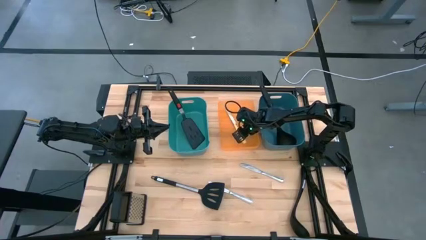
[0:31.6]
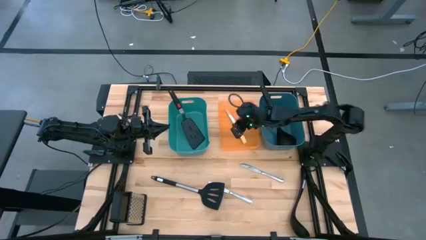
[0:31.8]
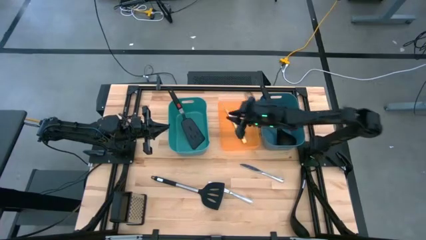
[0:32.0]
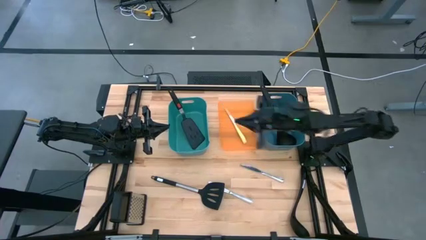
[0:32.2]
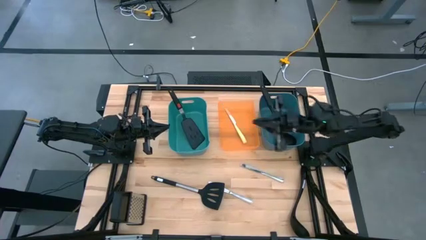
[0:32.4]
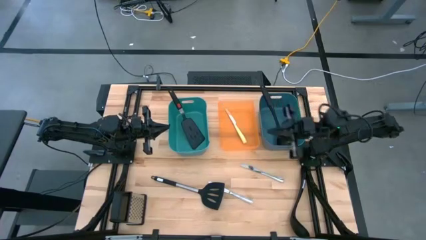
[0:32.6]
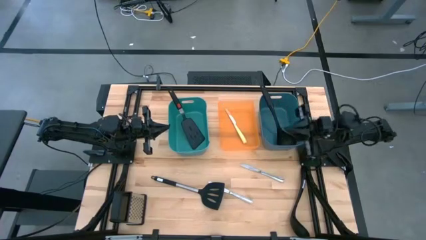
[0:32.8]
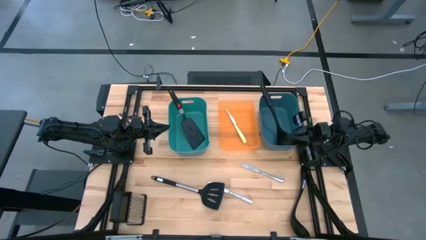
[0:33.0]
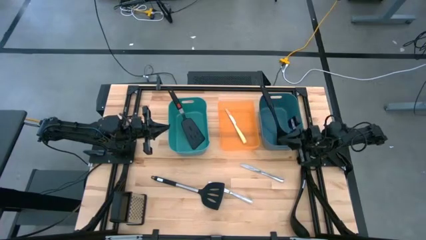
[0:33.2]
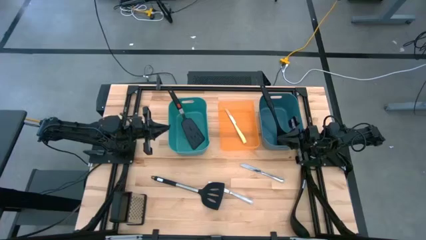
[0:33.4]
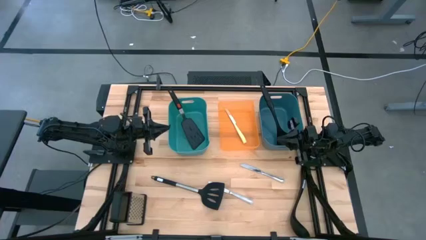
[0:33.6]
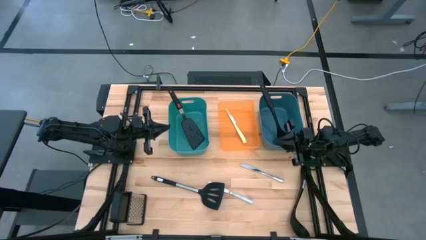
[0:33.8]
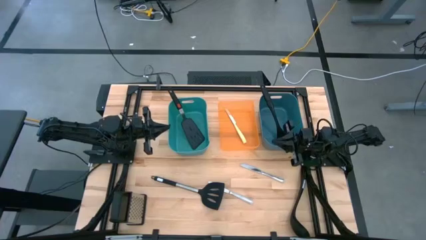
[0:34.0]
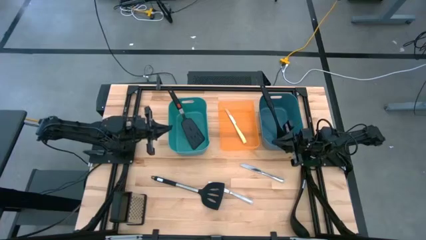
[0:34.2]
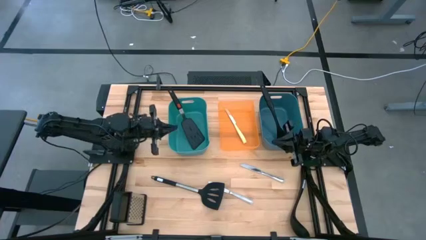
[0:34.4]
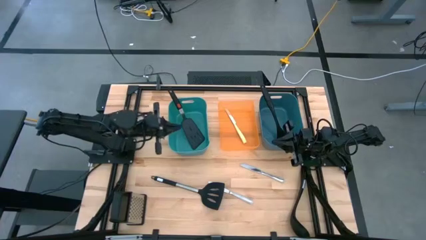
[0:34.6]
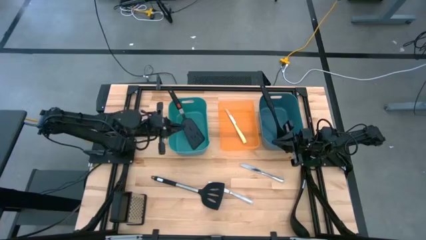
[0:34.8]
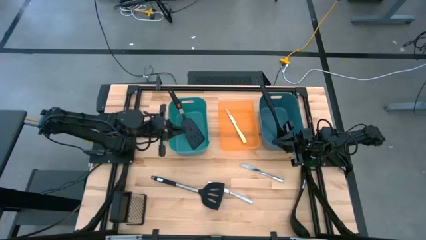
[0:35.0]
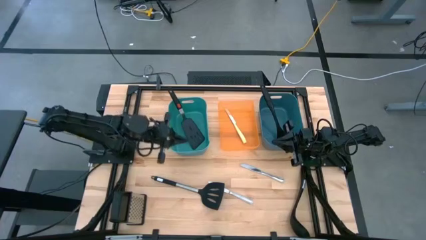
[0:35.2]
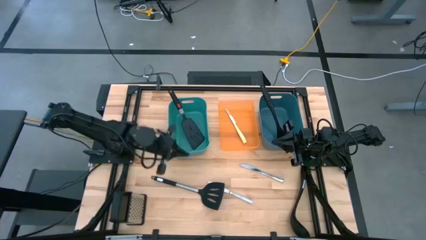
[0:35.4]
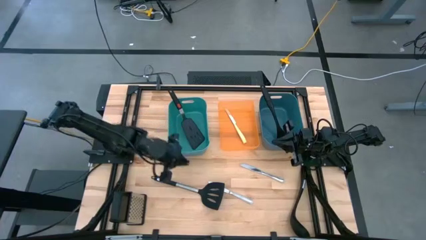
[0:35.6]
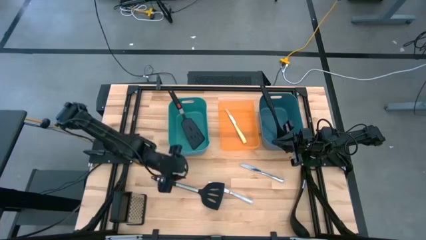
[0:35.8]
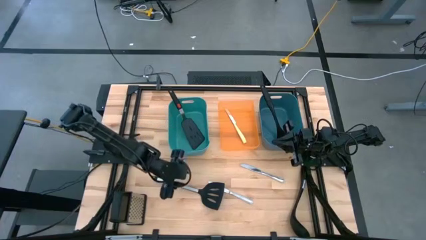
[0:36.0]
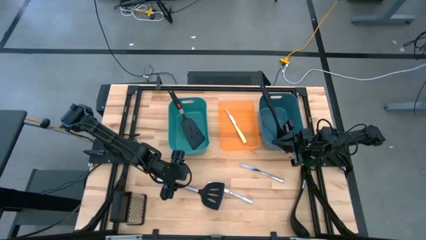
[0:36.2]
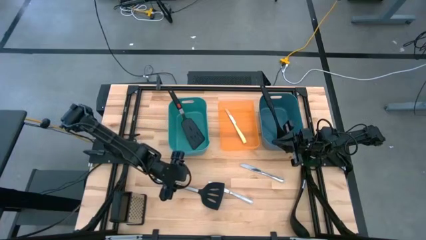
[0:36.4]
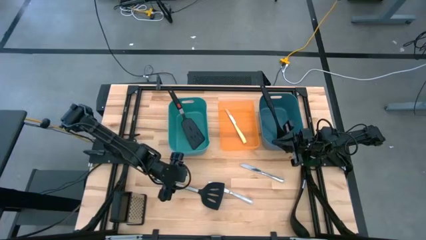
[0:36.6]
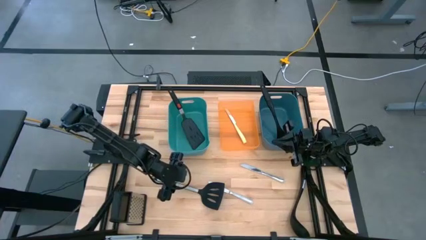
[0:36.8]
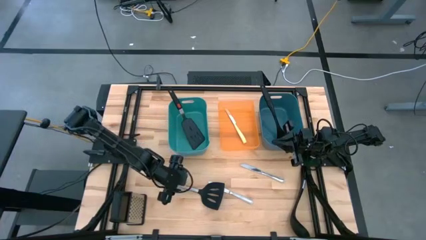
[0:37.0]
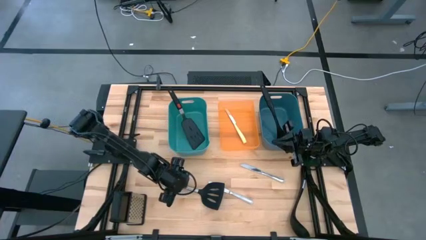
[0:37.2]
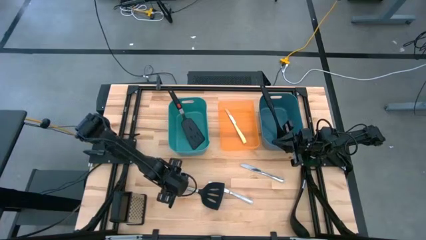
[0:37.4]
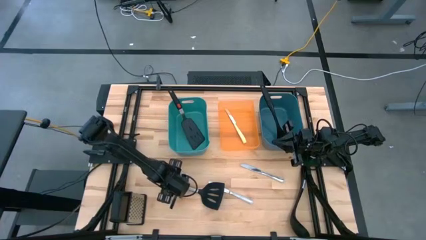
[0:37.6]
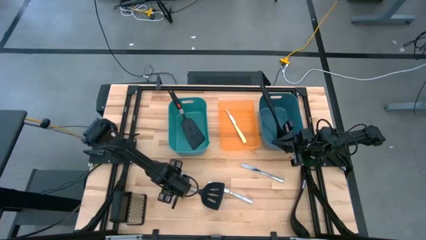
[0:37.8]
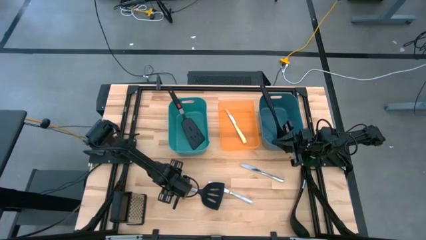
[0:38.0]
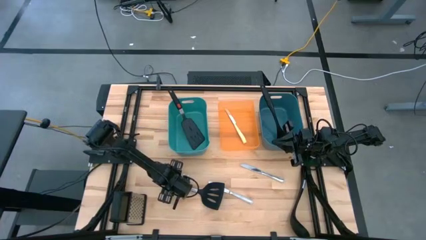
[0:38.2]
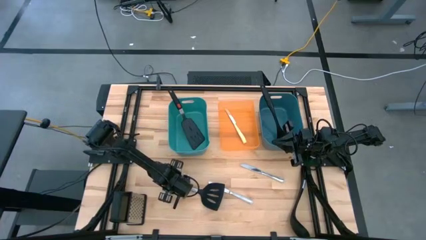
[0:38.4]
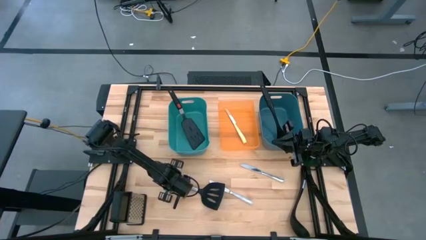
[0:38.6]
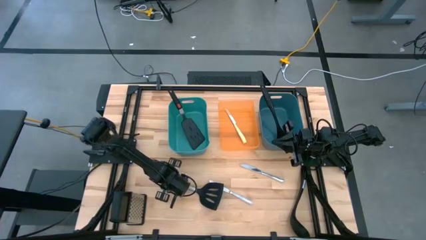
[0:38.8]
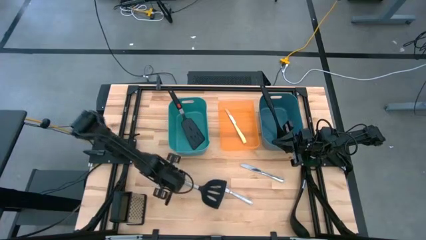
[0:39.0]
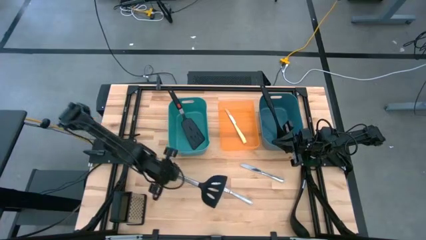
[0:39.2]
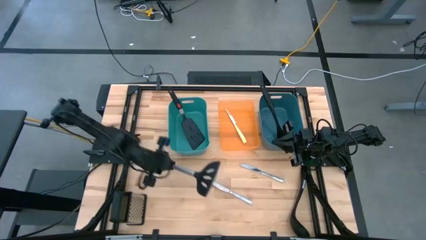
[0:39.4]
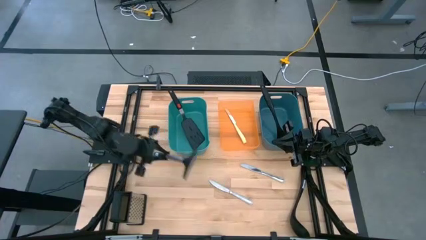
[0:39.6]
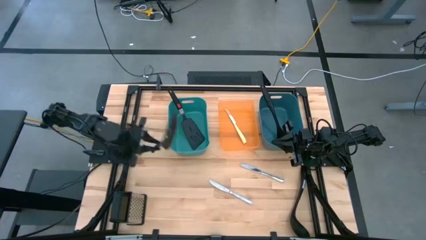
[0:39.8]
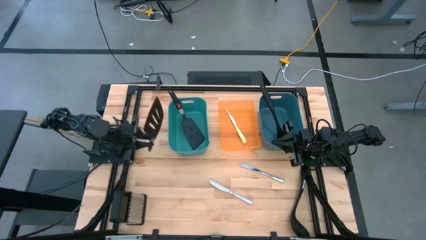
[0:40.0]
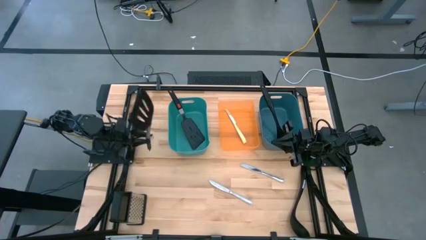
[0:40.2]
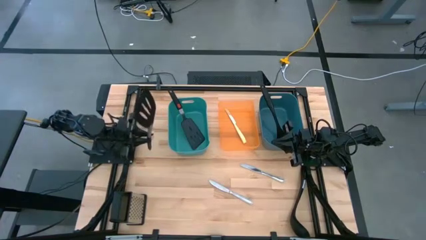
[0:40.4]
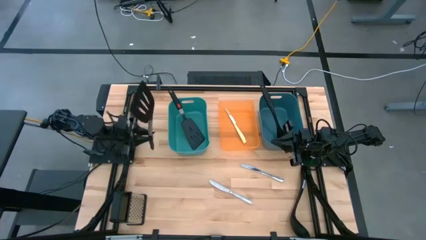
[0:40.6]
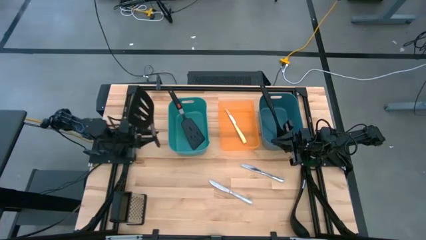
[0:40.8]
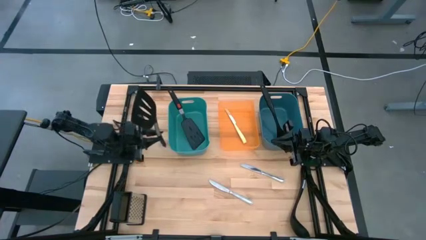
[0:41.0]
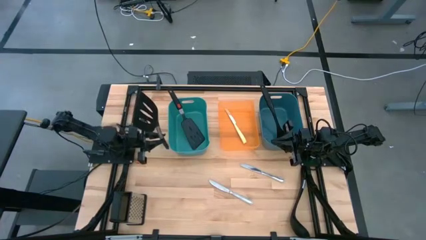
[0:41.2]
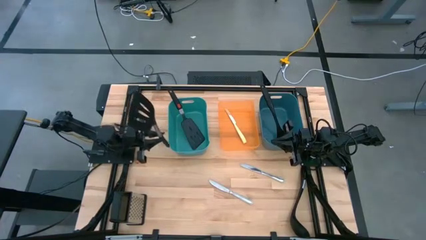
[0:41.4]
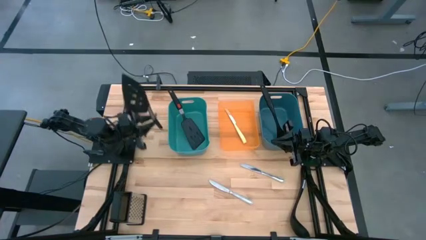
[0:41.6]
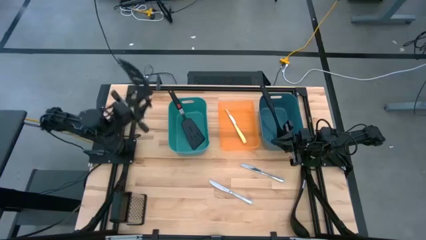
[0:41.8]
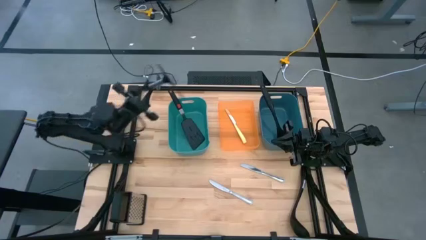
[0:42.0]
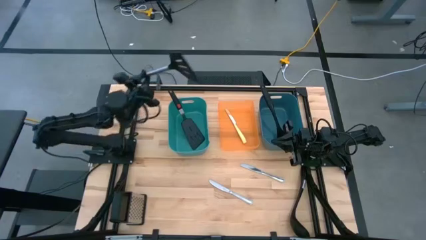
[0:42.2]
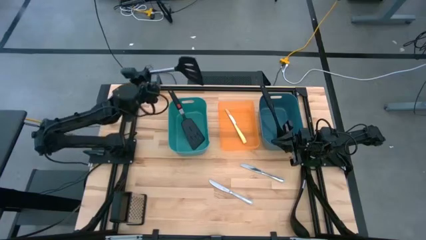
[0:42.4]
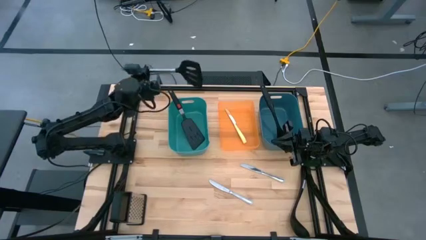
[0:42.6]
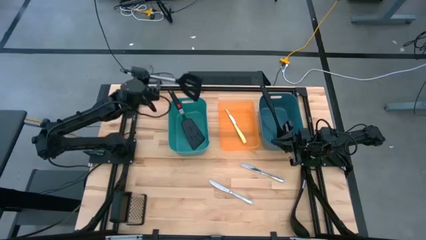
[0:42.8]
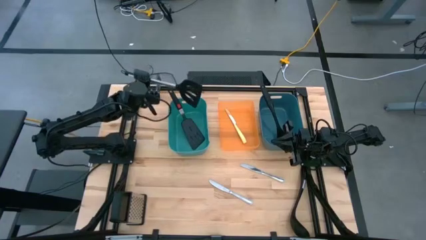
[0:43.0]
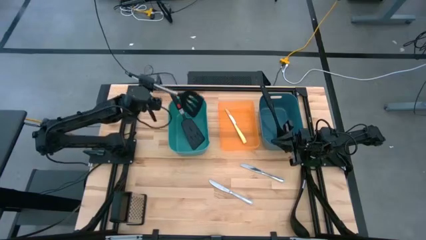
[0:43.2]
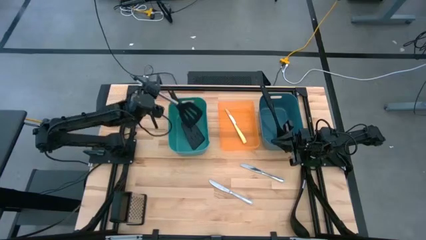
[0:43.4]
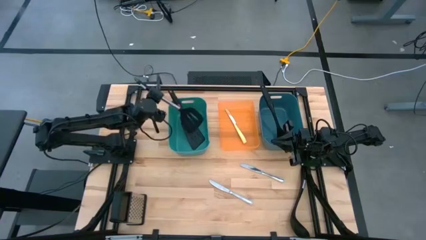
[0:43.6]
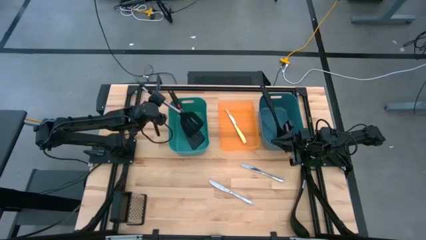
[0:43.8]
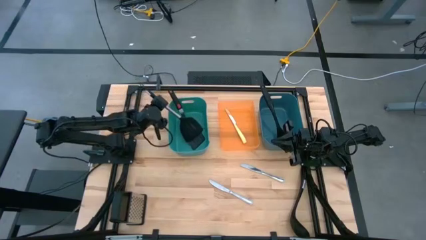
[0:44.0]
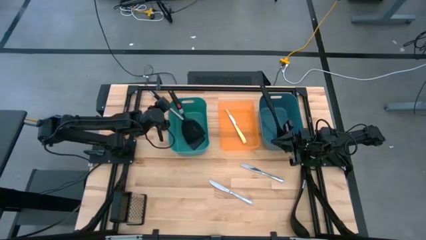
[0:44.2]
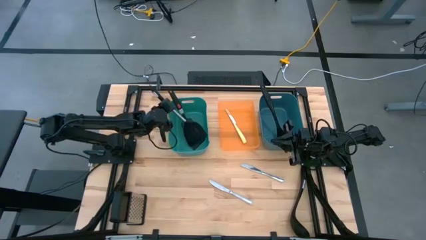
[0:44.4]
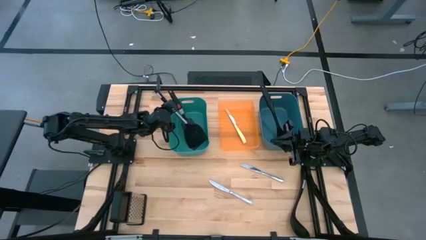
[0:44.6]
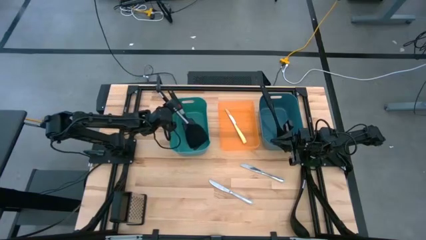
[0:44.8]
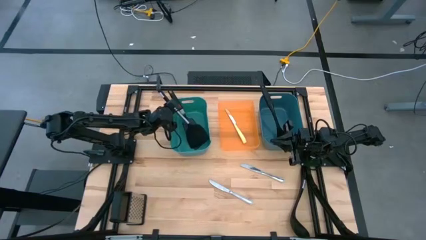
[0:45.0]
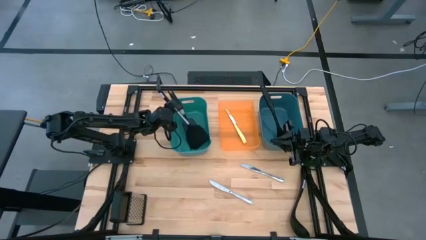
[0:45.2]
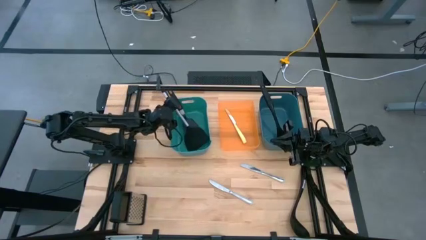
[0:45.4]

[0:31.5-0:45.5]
Task: Pick & Place Kitchen Items
Put the black spatula into the green bin

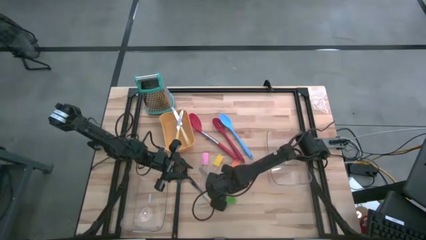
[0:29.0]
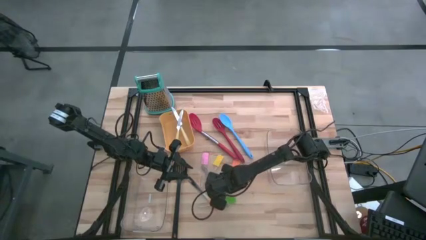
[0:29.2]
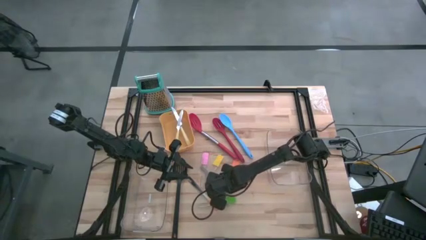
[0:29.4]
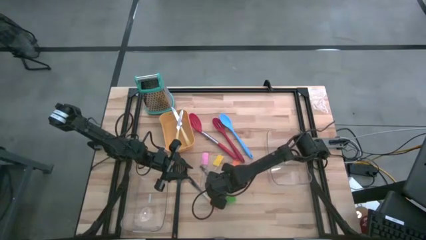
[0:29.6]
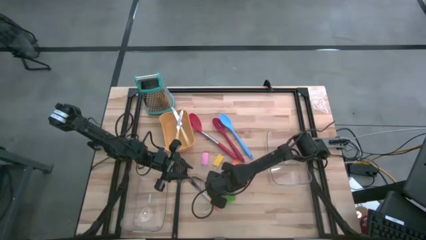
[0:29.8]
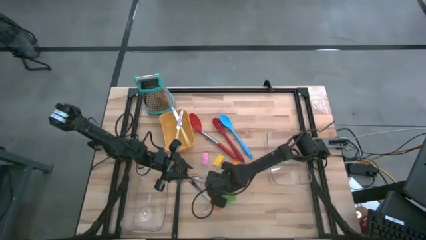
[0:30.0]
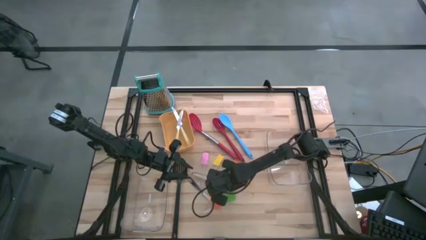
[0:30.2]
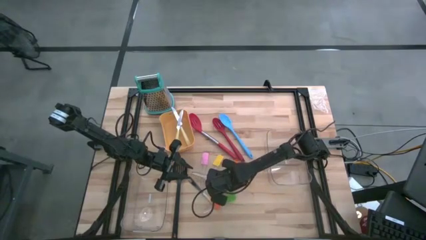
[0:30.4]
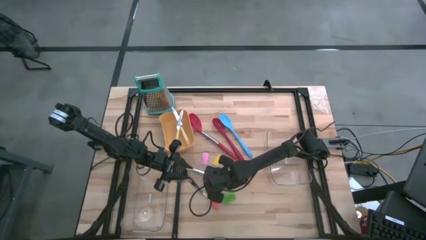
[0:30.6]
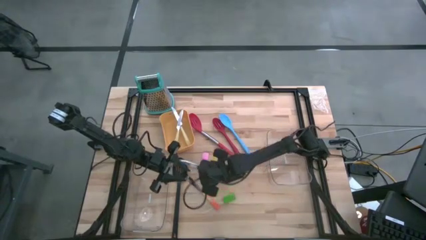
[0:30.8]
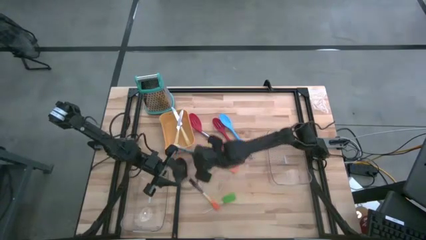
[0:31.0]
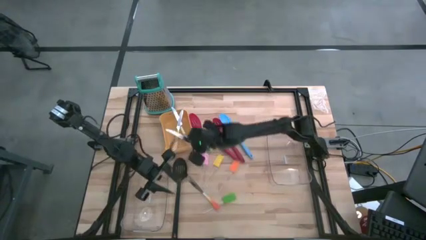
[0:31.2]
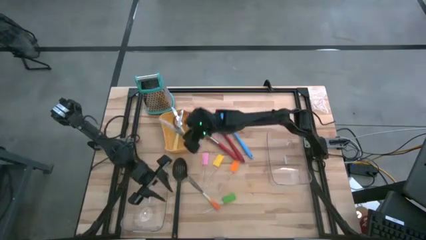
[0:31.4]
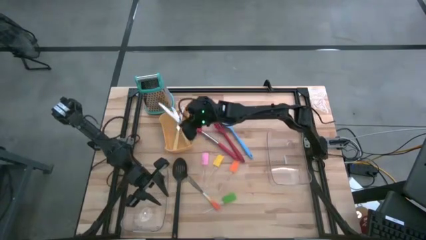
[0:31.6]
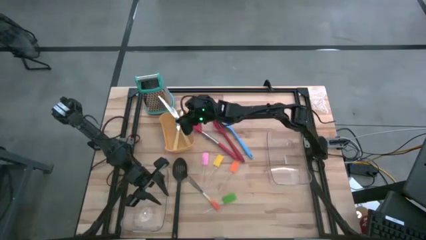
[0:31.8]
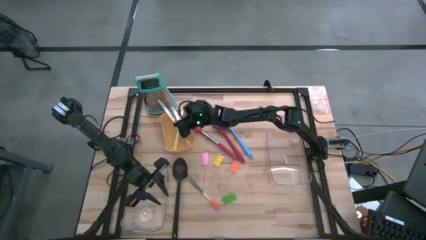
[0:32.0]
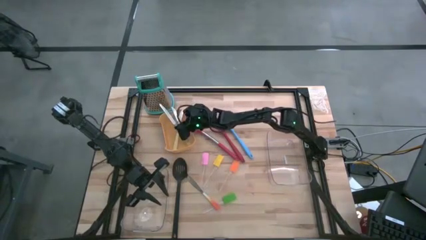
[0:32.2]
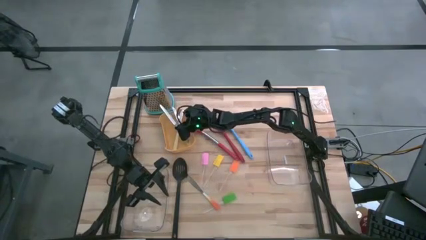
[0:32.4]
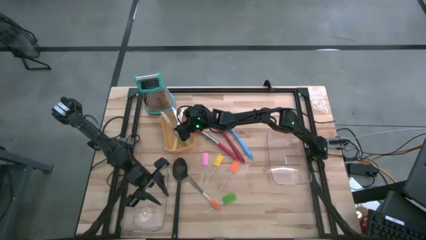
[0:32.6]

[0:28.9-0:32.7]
Task: Pick & Place Kitchen Items
Put the green knife into the yellow bin
